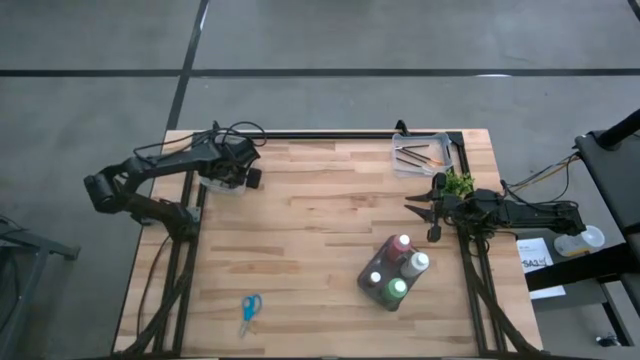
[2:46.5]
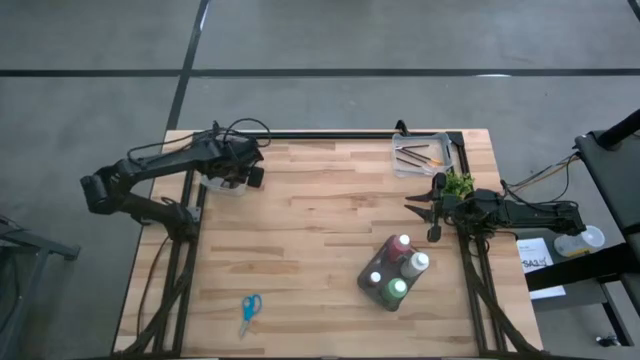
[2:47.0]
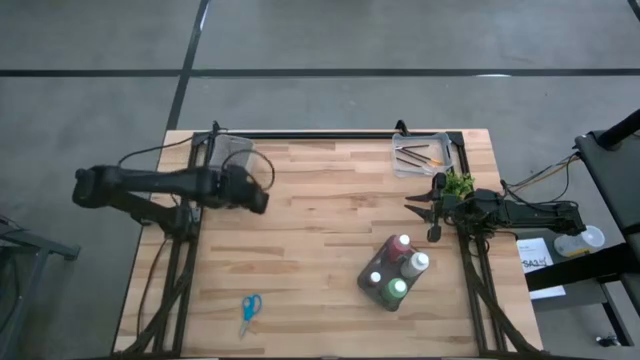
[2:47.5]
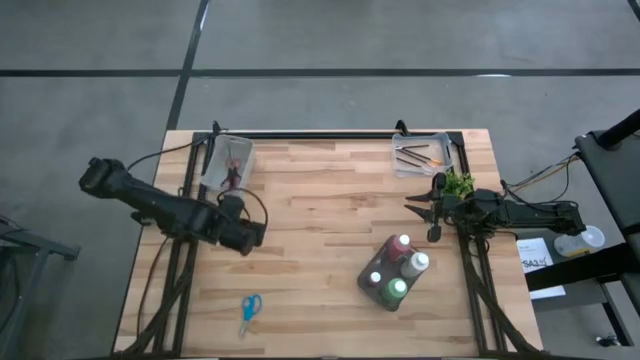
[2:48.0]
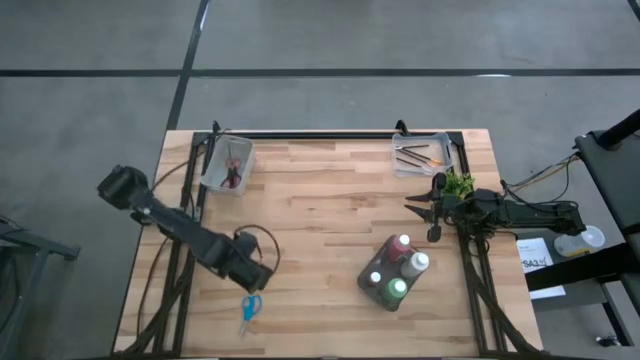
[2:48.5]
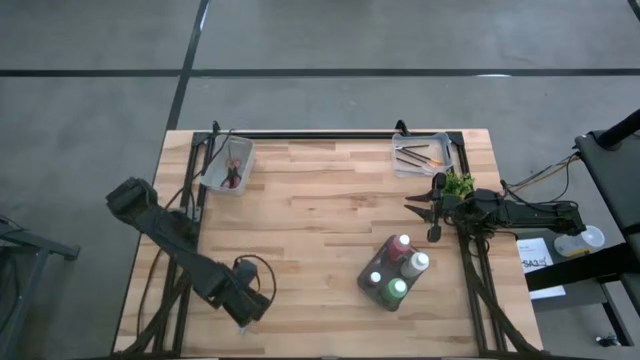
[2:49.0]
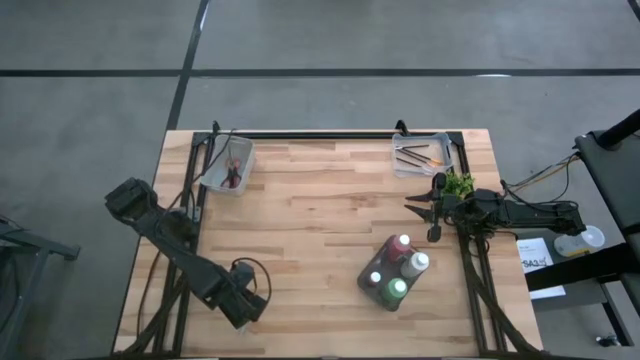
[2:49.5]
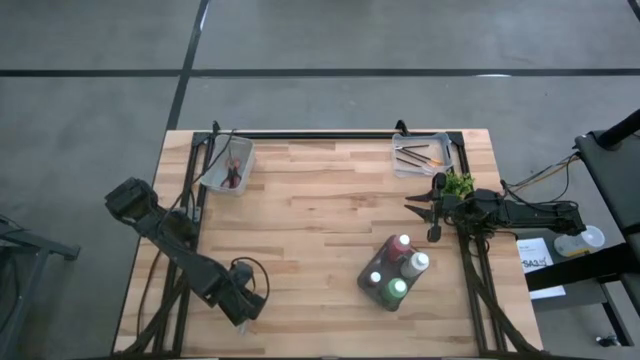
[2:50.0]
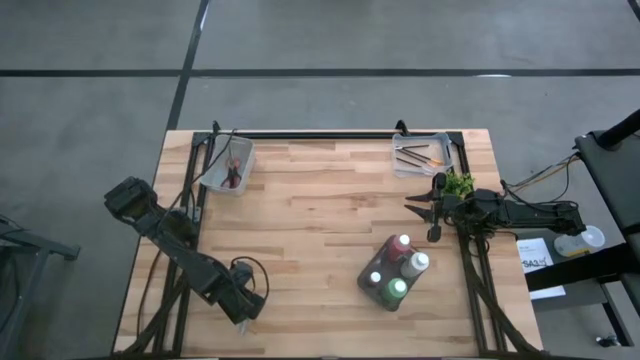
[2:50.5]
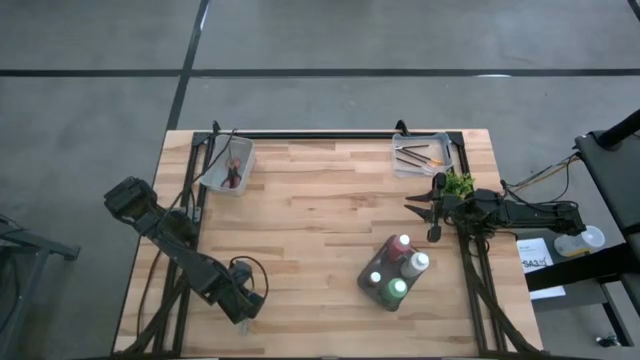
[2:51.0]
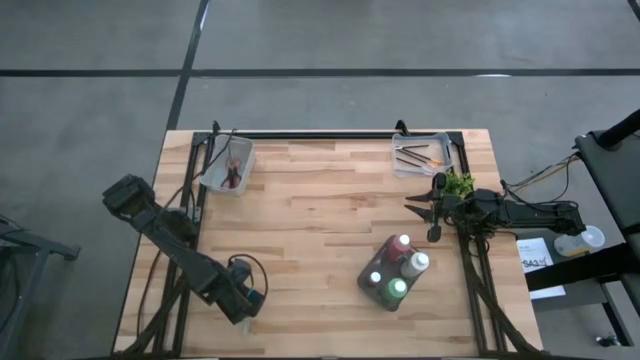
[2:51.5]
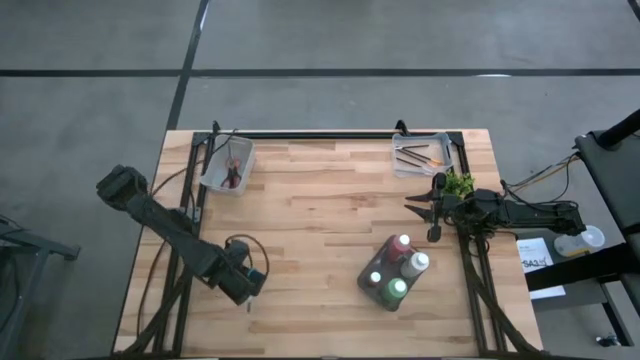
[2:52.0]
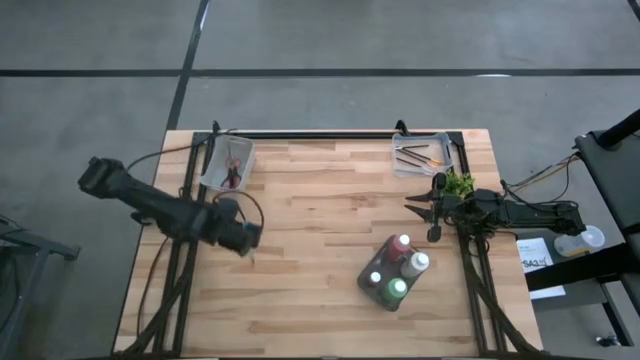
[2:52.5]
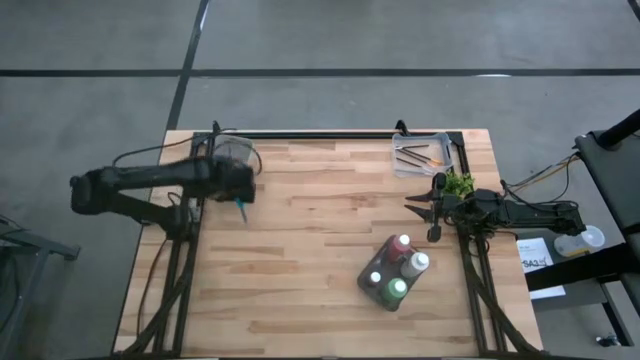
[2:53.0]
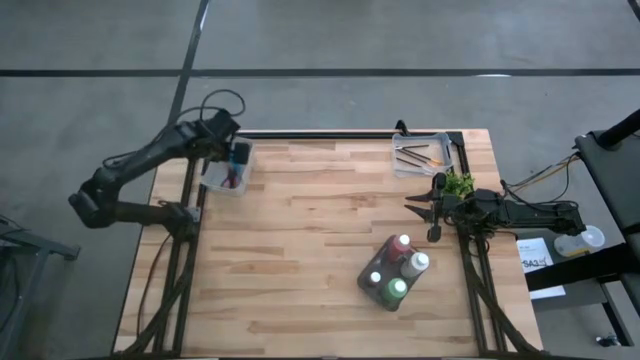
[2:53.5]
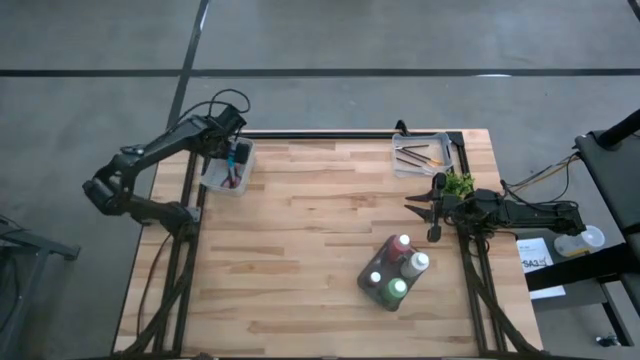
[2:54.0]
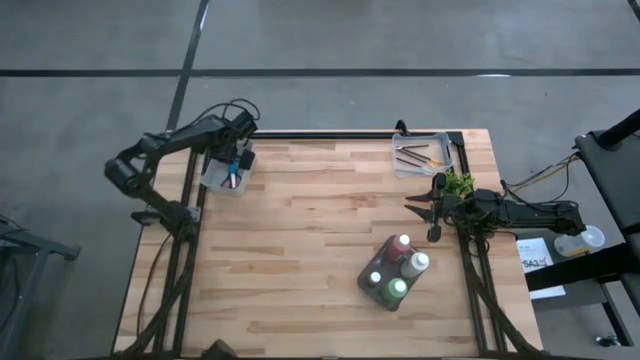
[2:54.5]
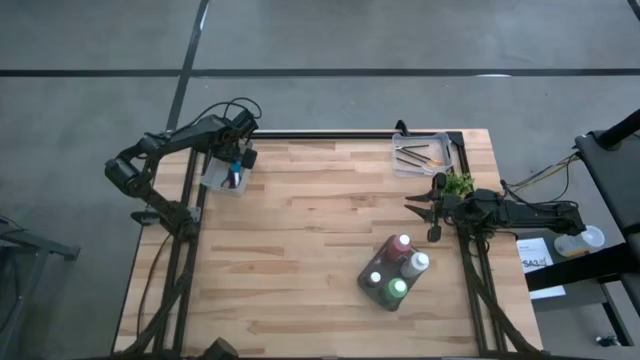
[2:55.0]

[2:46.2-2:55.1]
Task: Pick & Place Paint Supplies
Put the blue scissors into the white bin

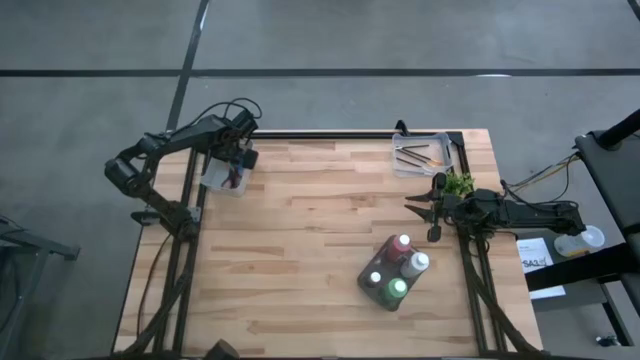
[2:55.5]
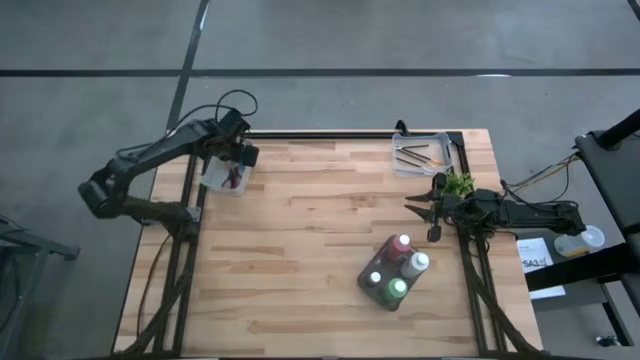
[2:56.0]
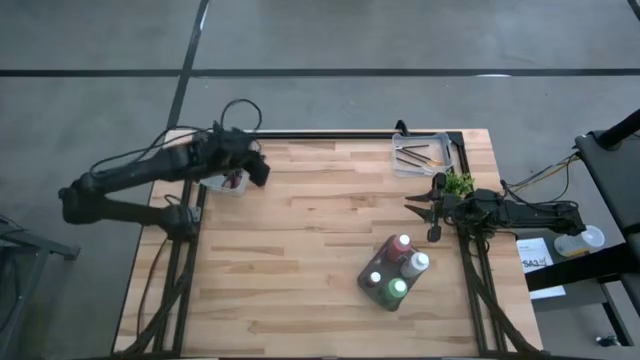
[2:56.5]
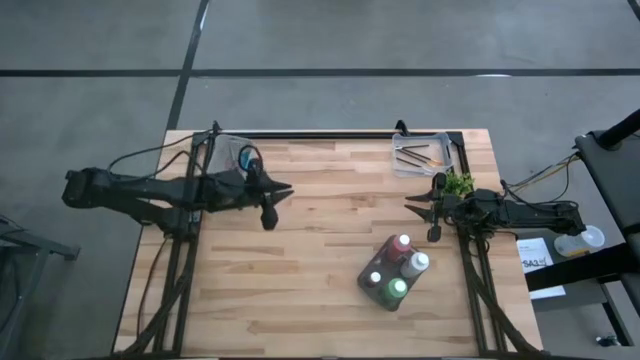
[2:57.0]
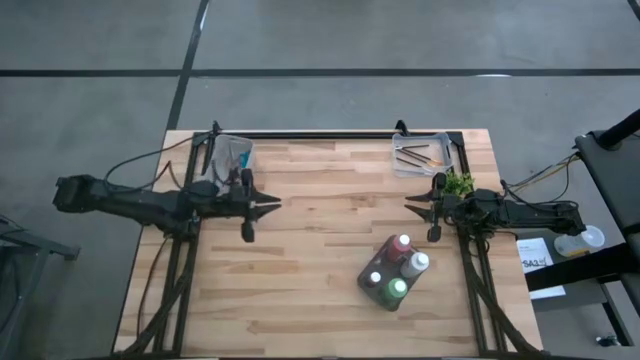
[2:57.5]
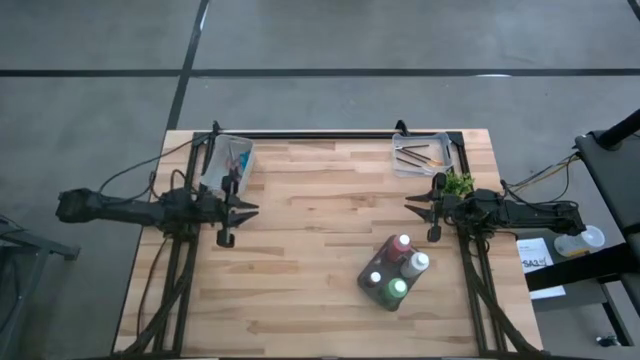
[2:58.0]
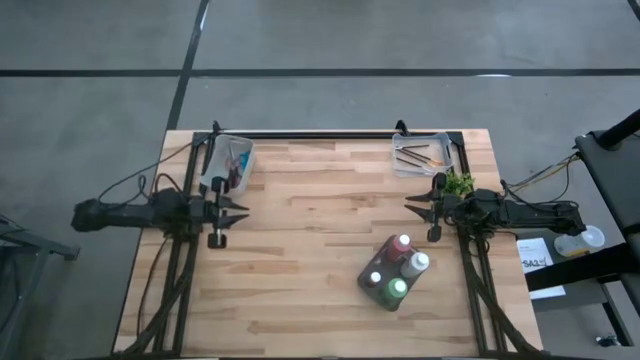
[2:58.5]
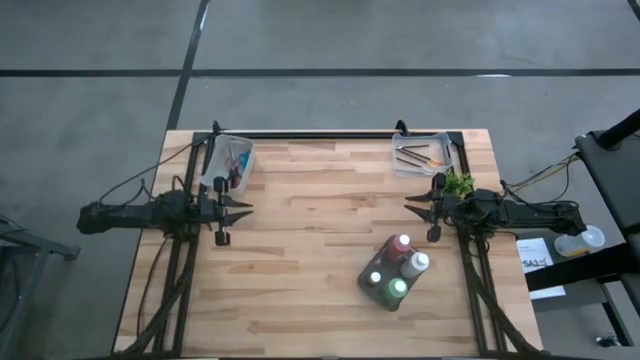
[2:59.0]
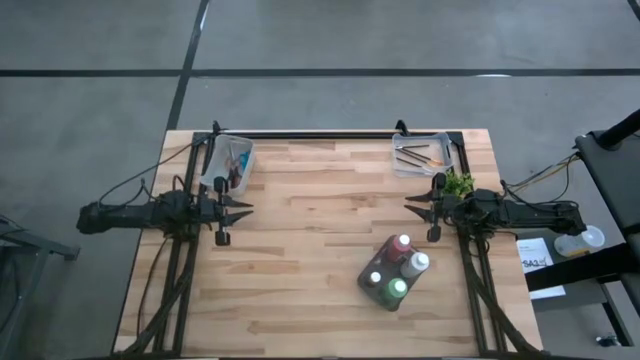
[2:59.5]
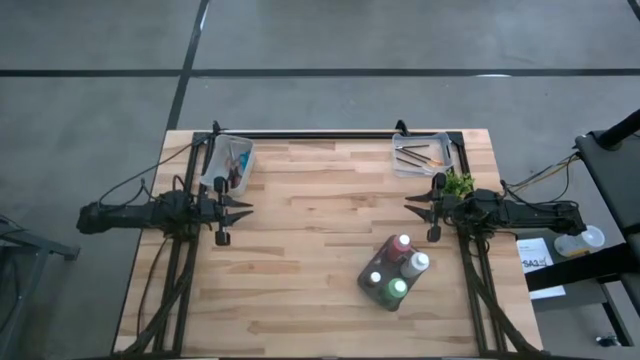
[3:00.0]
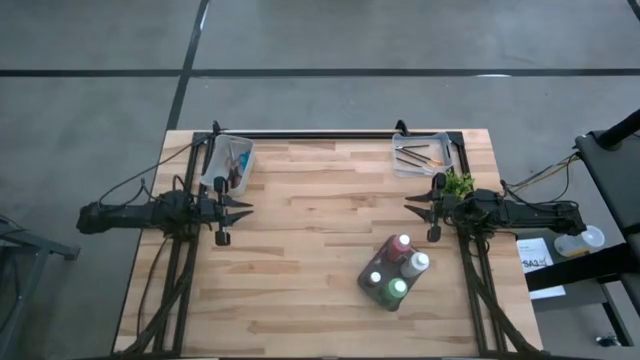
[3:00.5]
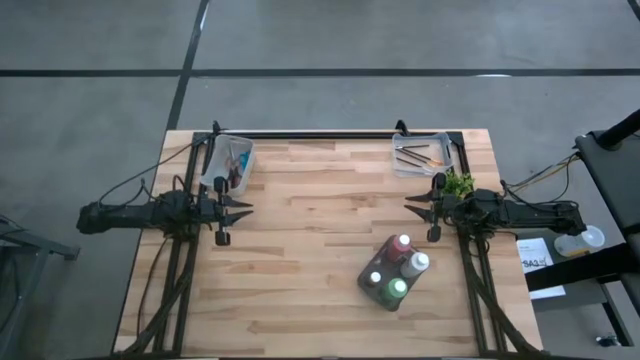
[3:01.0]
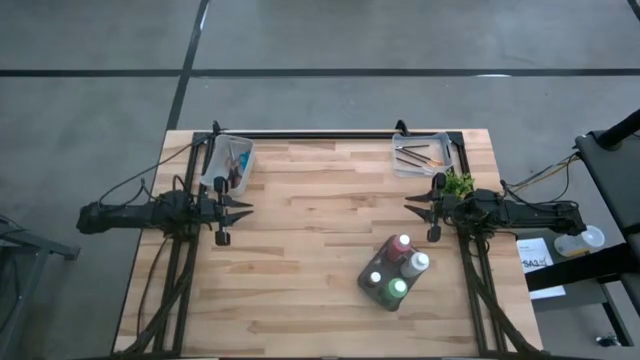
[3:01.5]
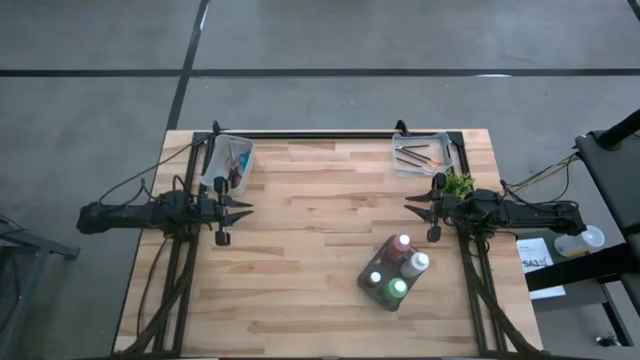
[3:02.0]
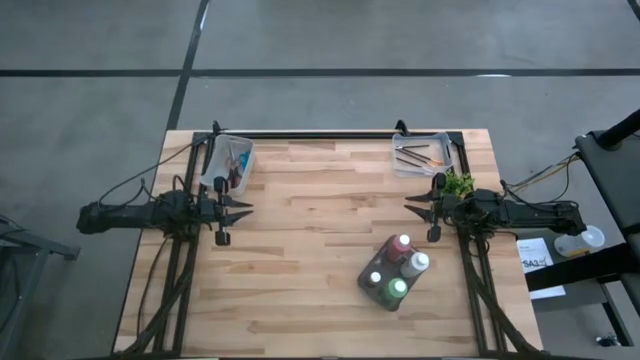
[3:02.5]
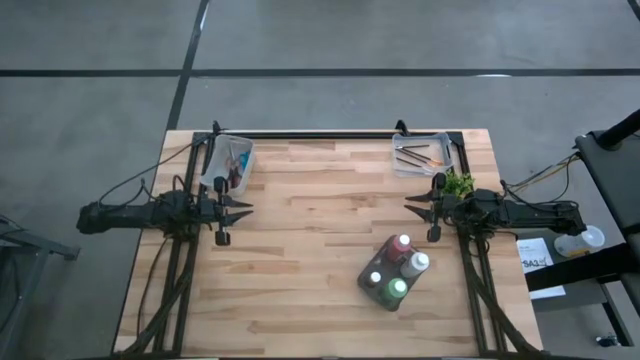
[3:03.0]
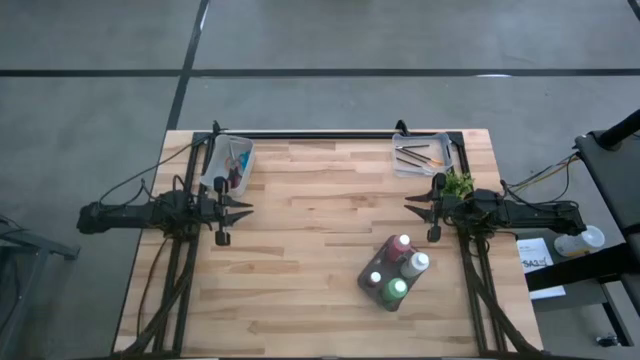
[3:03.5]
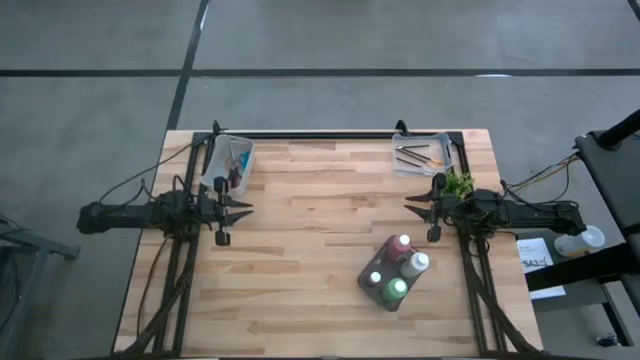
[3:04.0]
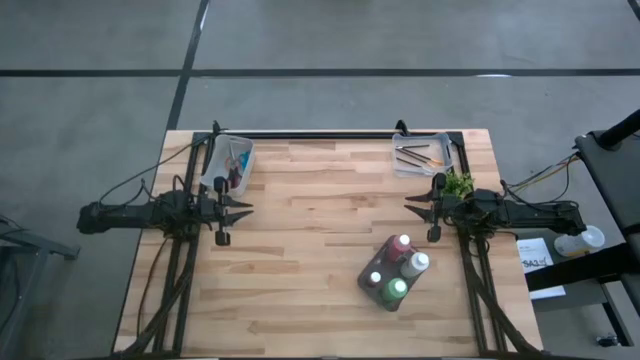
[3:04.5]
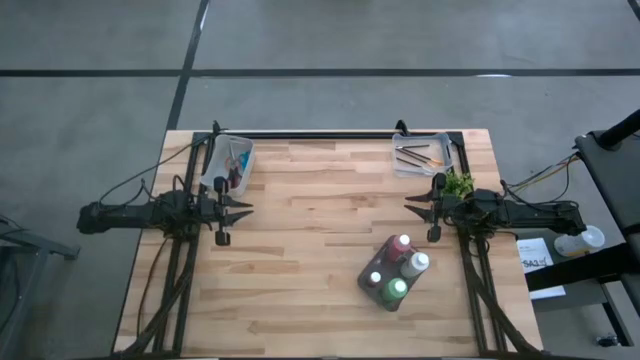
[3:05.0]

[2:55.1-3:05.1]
Return to Home Position

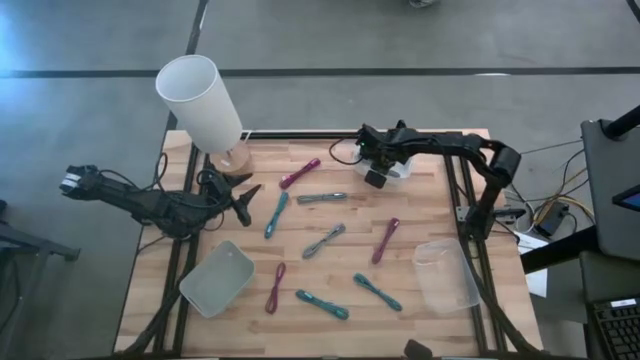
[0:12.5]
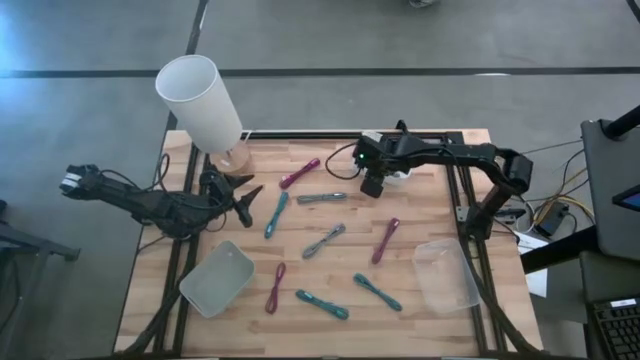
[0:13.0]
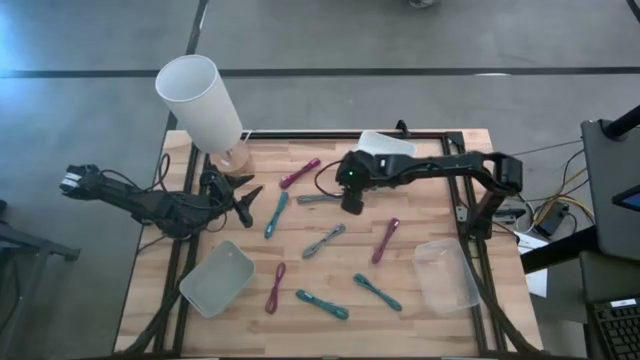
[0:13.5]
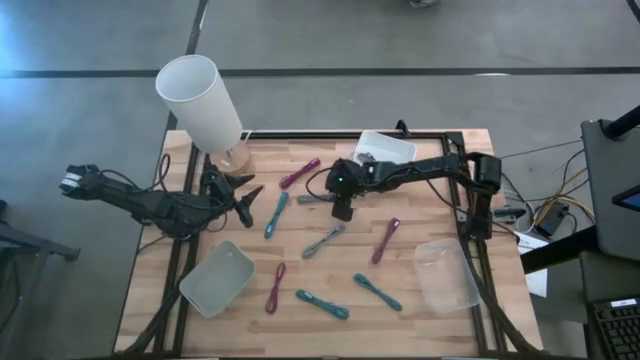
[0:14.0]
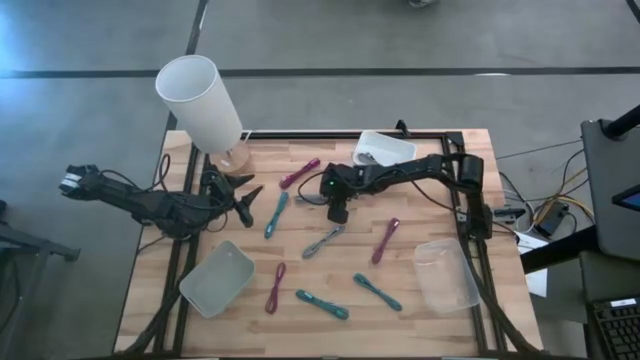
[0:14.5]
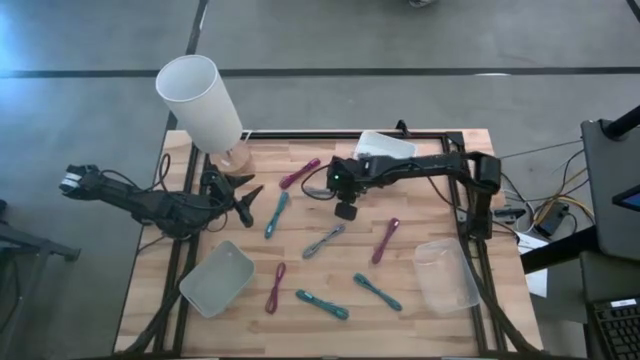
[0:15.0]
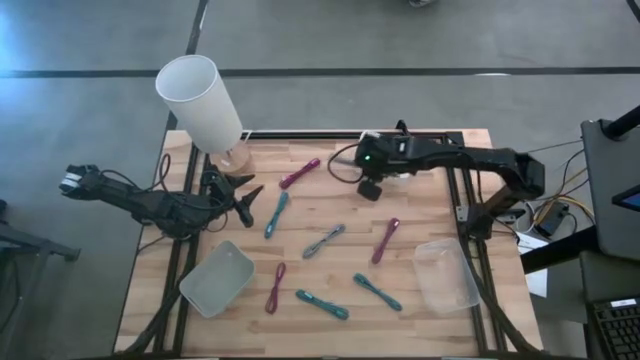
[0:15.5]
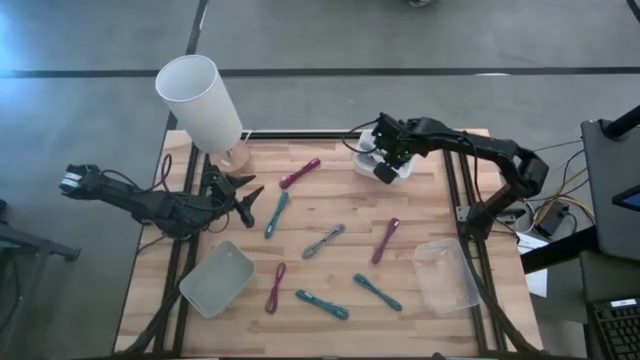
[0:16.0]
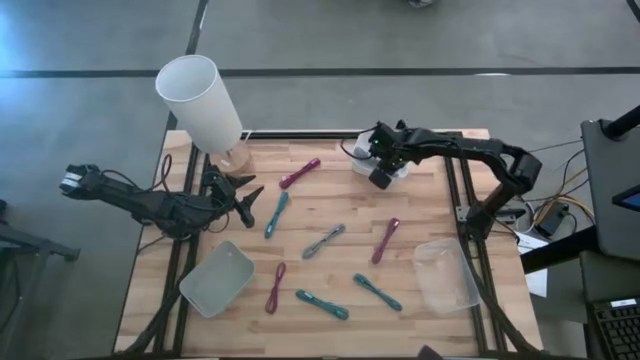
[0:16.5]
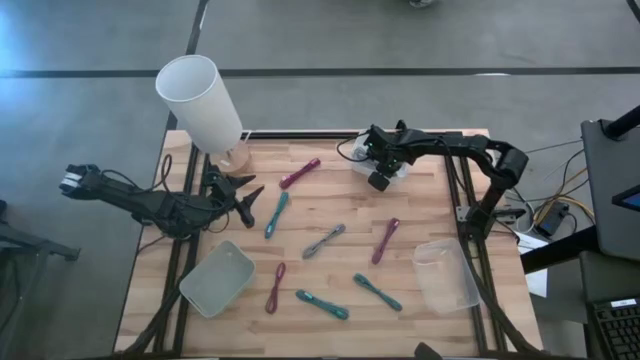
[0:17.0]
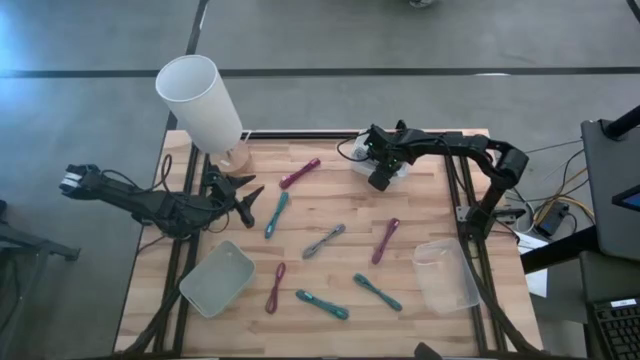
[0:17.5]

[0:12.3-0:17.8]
Task: Pick & Place USB Port
Put the top white patterned charger cable into the white bin
